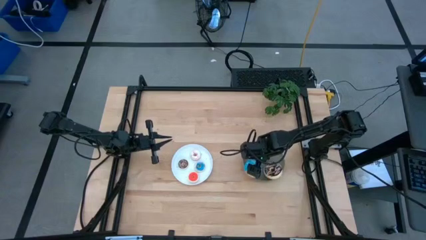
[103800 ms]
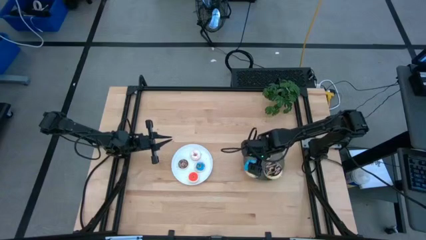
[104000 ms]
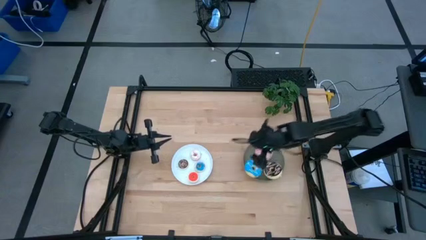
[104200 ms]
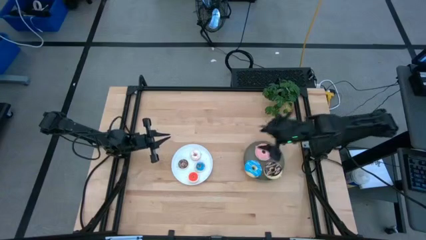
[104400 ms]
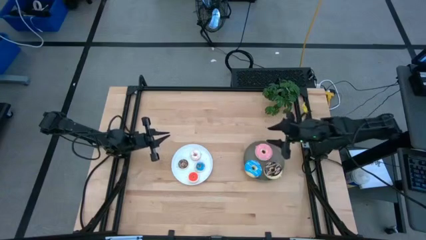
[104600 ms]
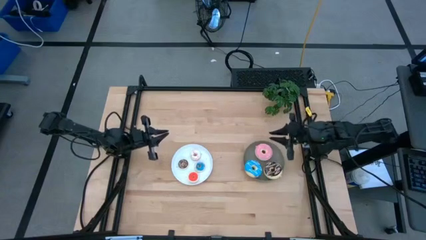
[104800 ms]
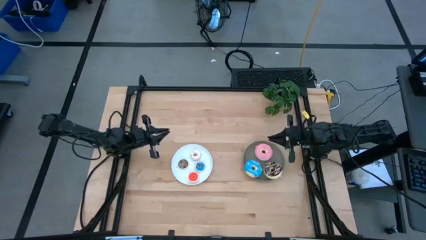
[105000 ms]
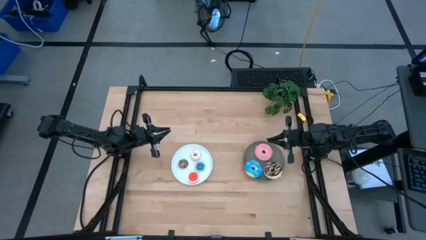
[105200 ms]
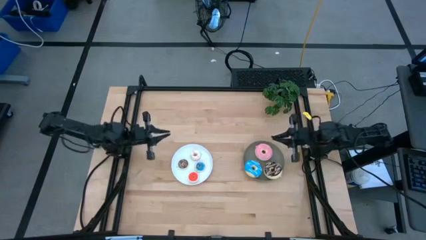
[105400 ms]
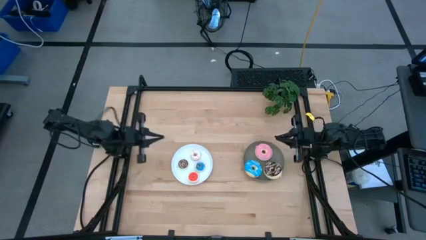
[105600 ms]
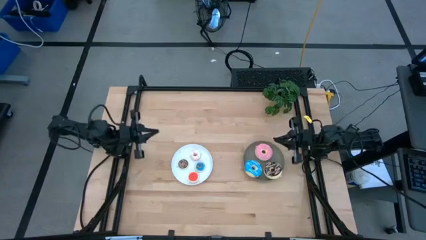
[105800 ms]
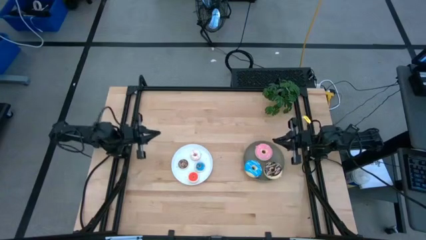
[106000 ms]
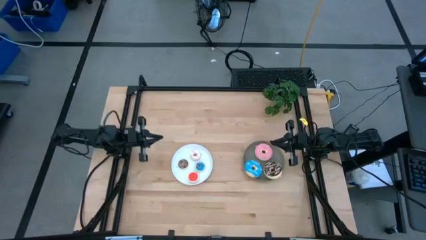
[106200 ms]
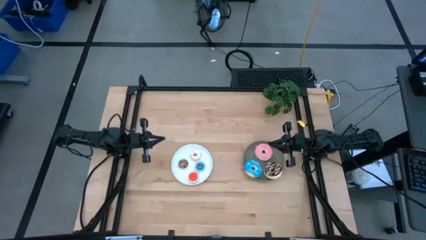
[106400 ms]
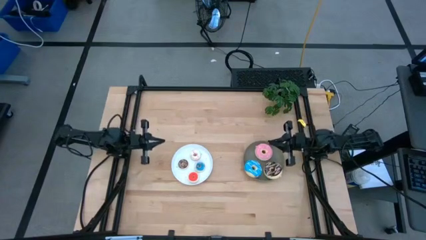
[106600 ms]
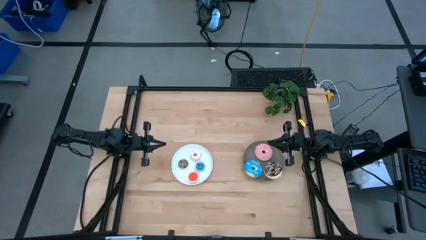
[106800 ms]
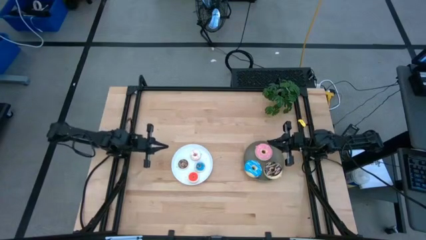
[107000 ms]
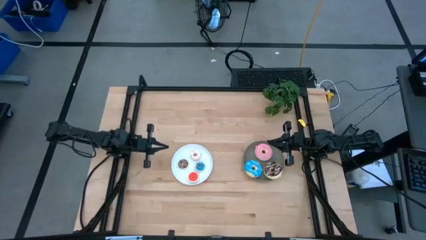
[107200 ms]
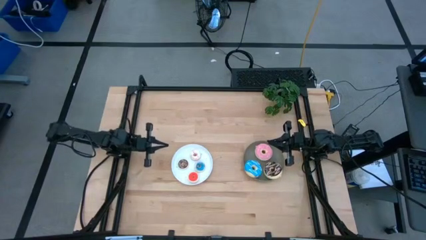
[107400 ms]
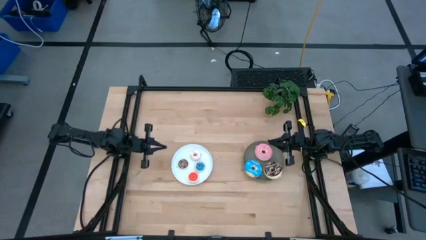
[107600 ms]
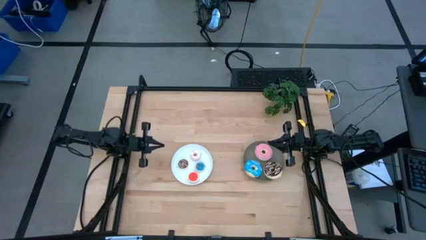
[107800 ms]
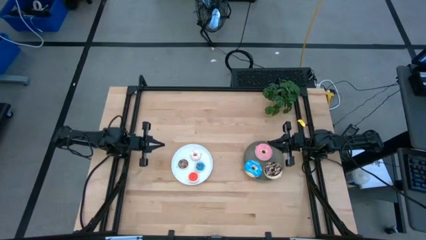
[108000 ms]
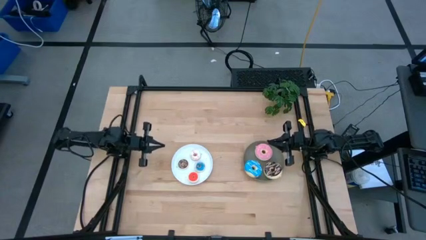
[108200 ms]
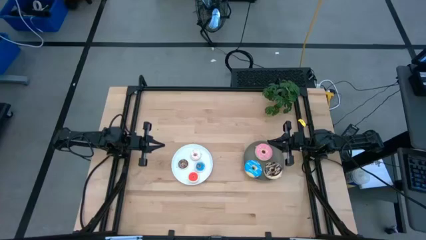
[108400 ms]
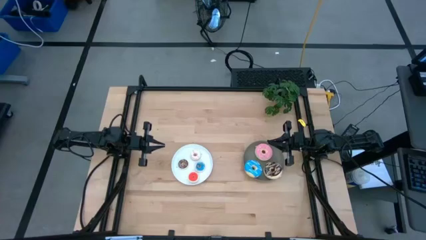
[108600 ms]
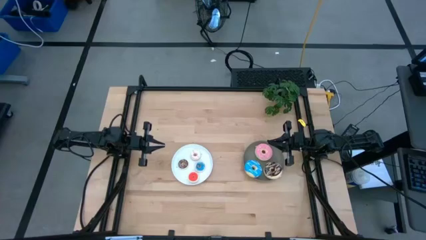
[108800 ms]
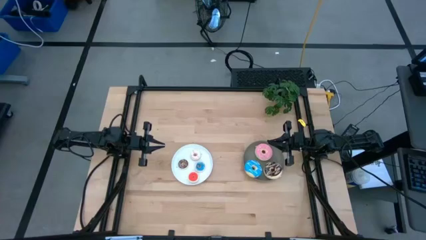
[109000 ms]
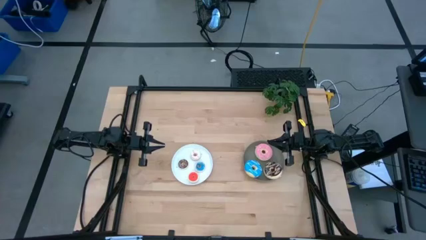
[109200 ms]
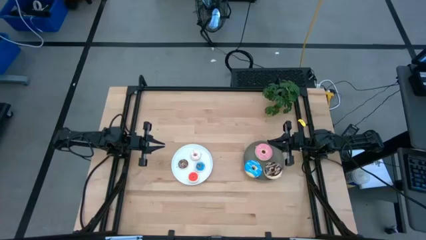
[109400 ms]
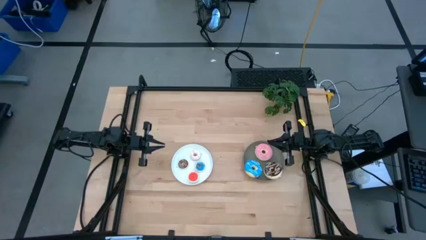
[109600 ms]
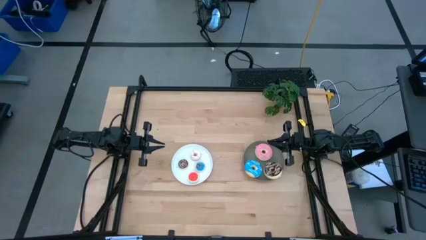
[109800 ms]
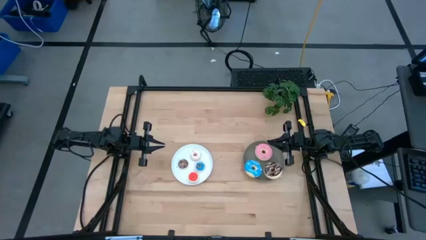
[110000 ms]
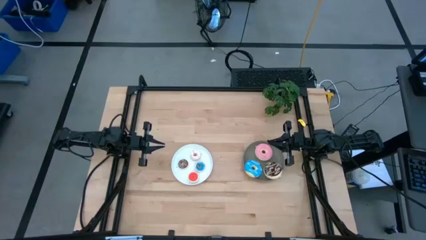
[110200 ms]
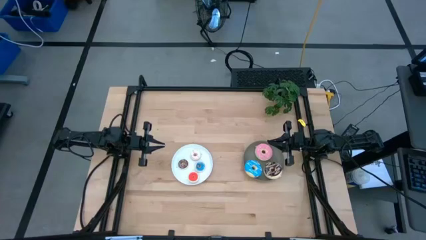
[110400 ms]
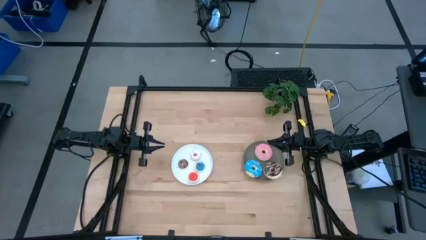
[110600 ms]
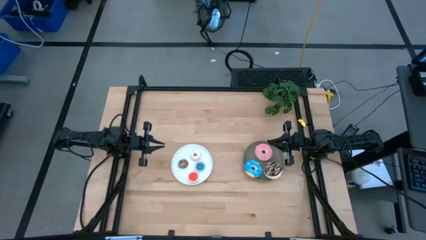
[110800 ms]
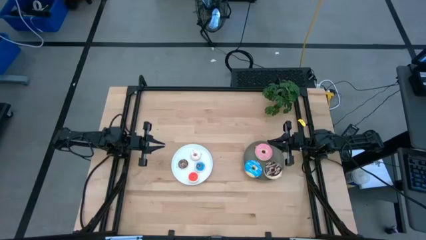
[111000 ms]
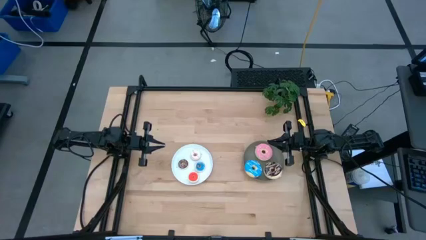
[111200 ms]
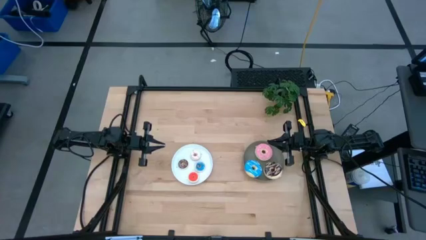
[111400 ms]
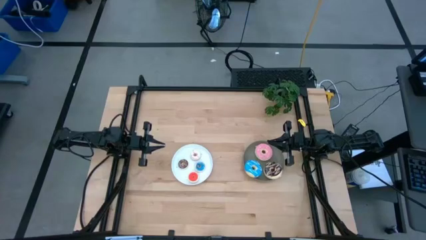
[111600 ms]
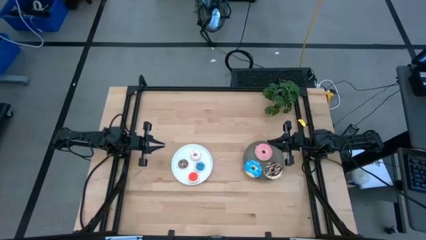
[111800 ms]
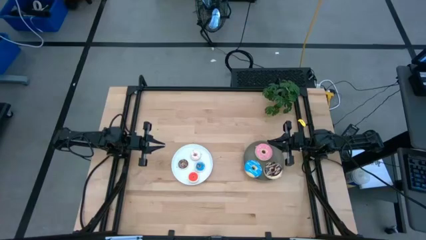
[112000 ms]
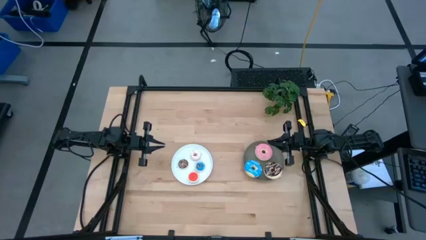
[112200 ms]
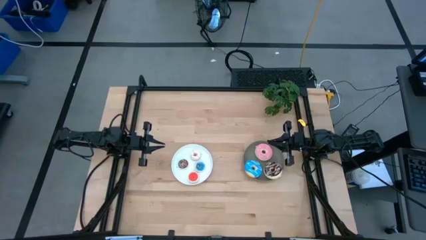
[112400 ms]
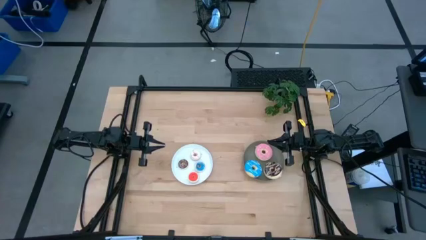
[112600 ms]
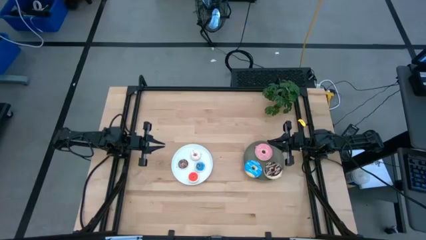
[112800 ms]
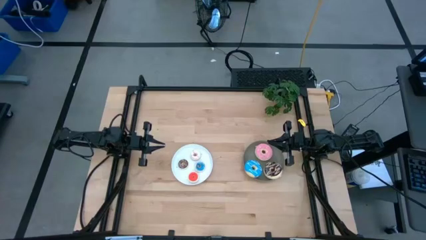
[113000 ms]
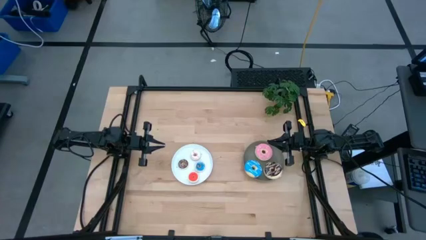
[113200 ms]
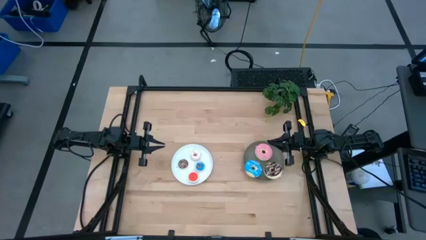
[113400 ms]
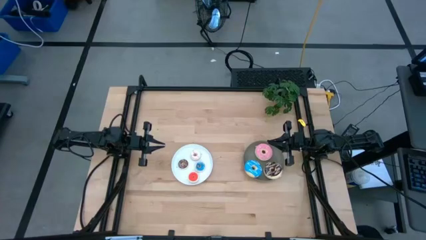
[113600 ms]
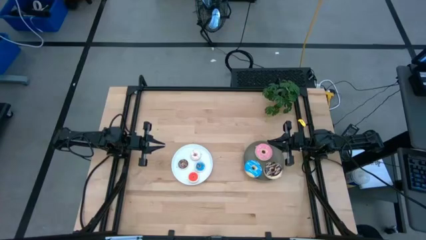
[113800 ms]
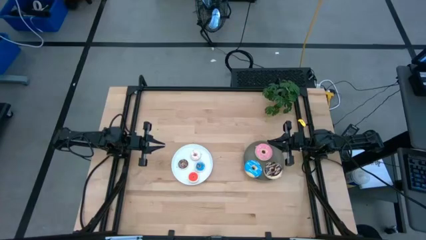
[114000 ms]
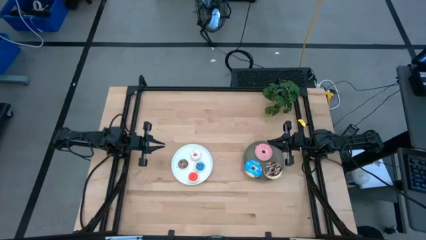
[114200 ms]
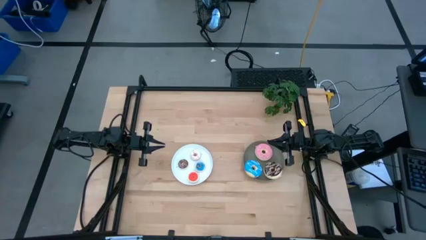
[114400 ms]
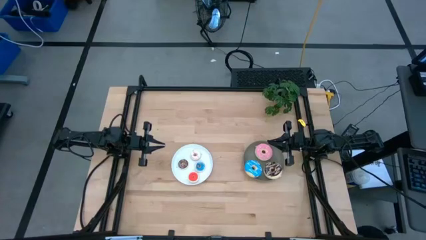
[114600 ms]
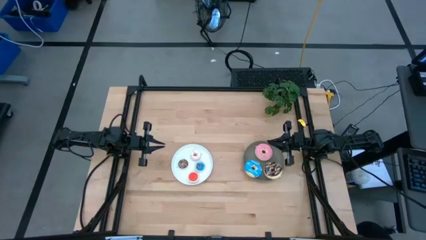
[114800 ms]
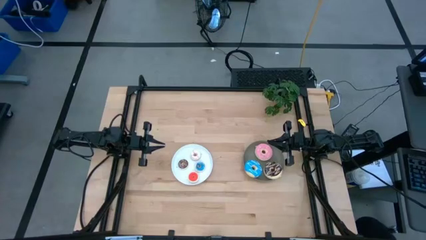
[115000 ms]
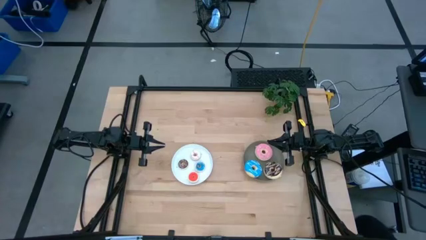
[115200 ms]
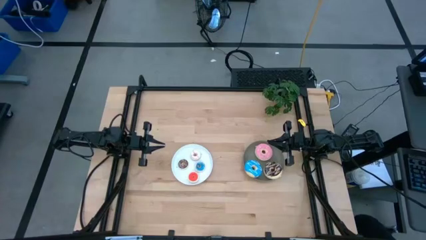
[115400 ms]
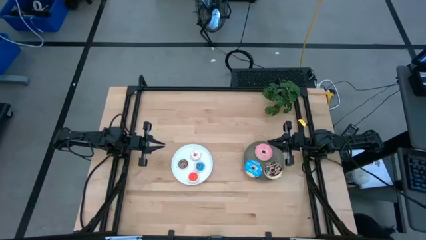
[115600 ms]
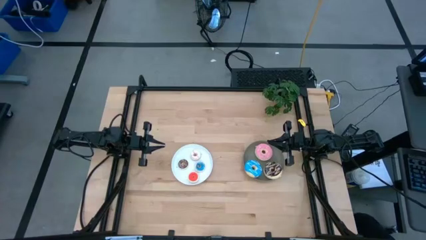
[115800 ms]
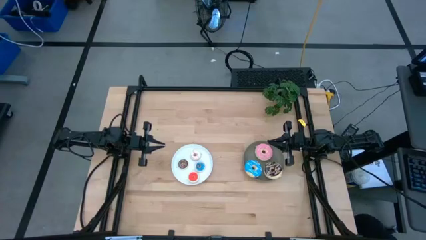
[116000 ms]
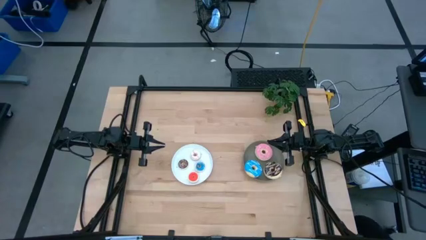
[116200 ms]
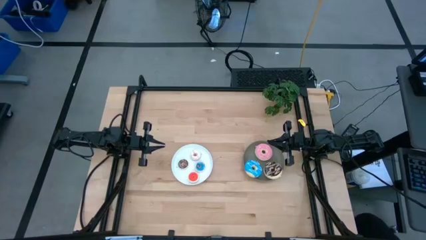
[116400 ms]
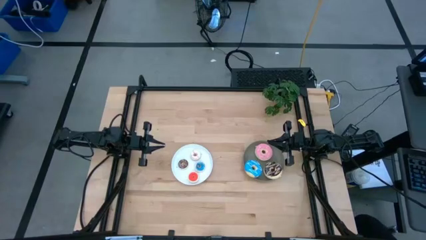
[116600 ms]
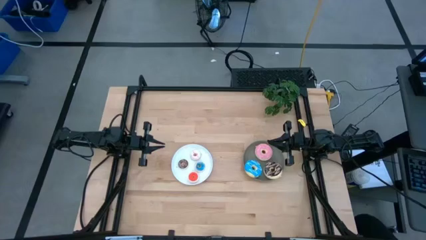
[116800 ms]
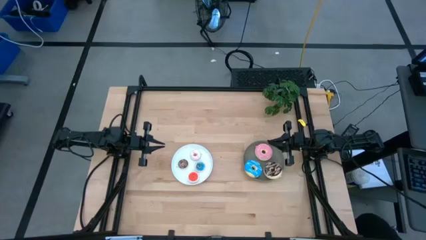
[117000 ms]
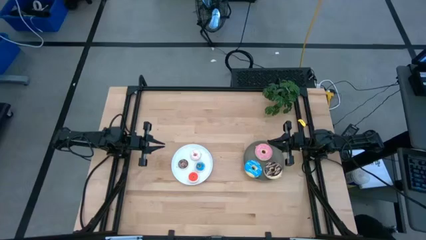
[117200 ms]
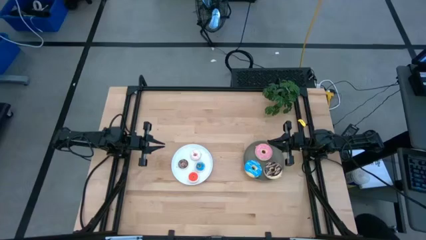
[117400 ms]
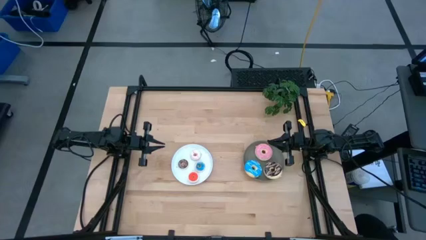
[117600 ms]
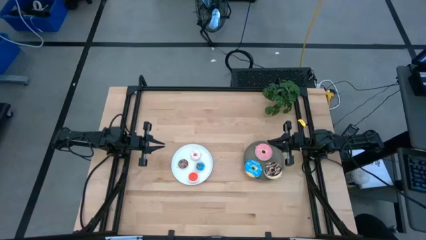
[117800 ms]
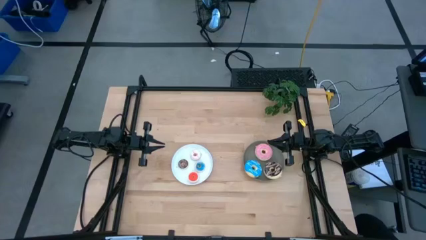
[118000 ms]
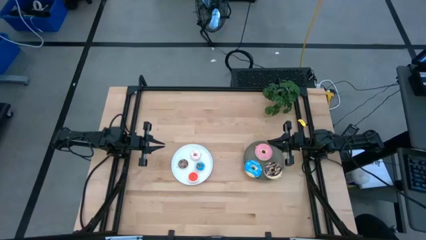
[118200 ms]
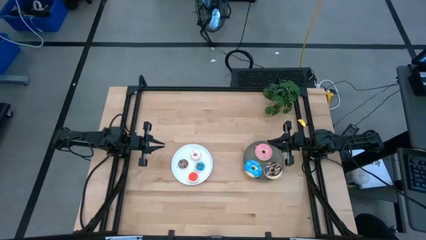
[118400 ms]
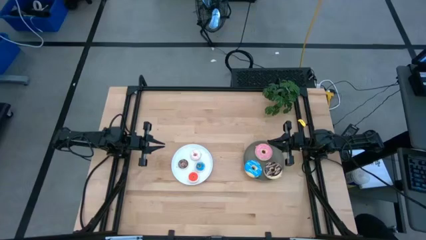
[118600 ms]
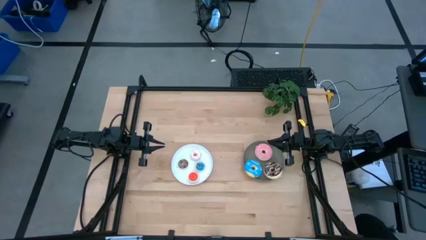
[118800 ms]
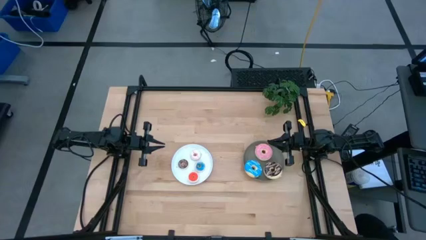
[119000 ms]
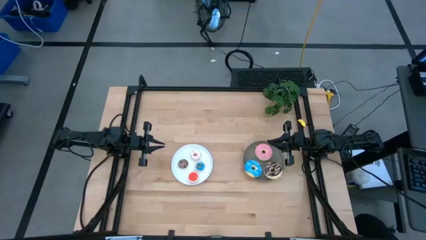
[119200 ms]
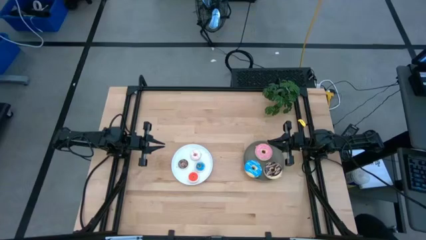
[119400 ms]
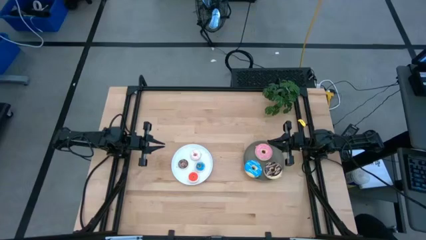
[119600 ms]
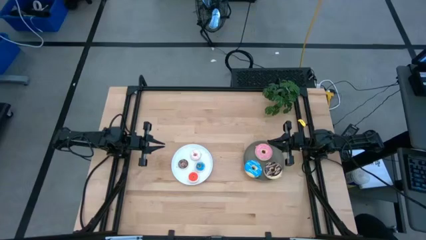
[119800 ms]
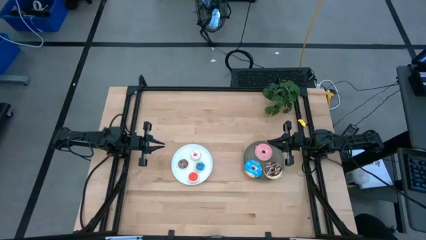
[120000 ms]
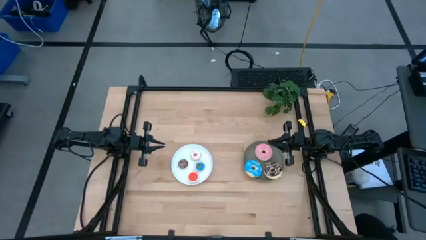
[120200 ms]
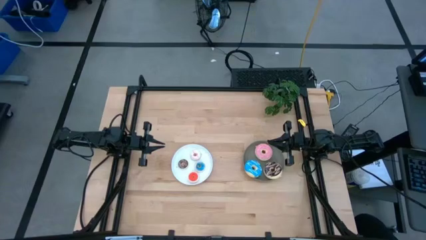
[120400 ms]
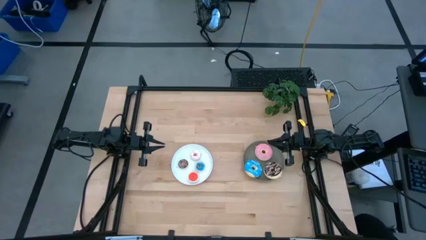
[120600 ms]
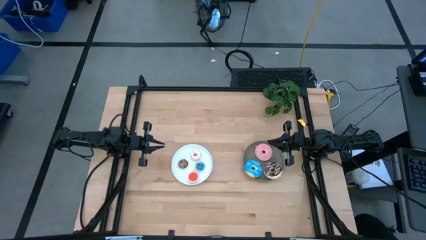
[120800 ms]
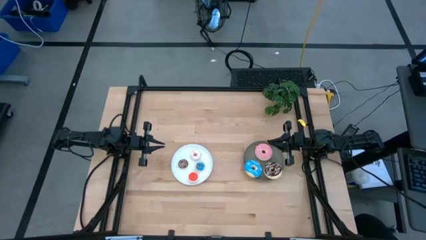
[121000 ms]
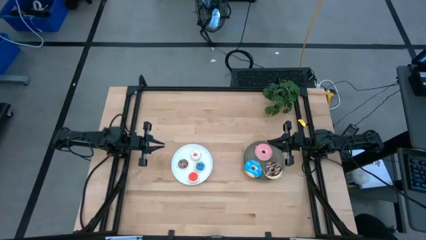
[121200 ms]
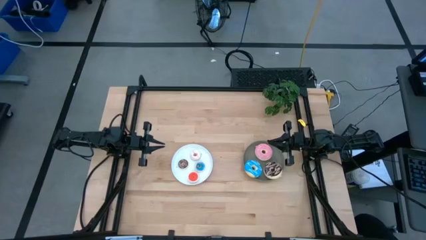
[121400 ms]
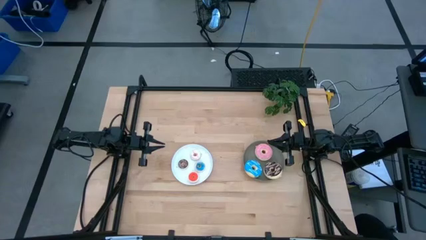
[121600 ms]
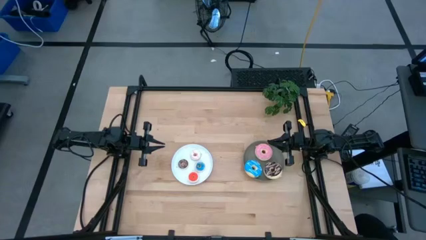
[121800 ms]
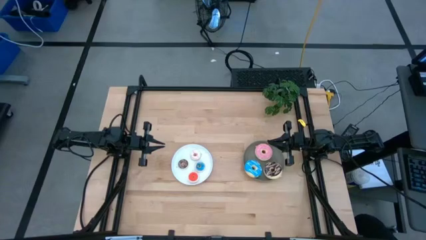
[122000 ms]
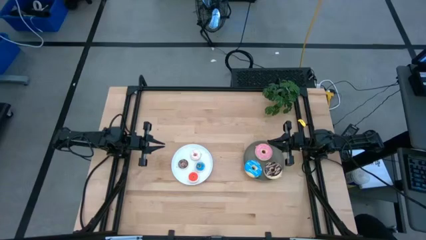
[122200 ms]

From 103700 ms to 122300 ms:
Task: Pick & Place donuts
Return to Home Position
